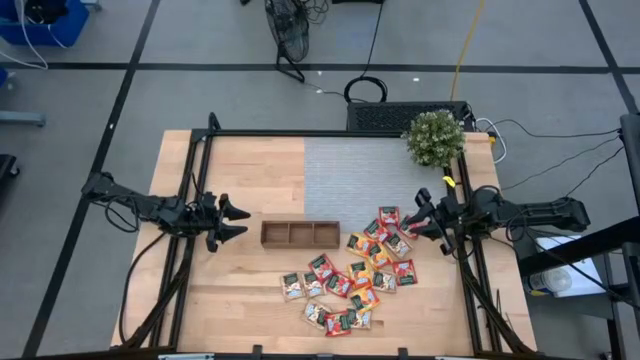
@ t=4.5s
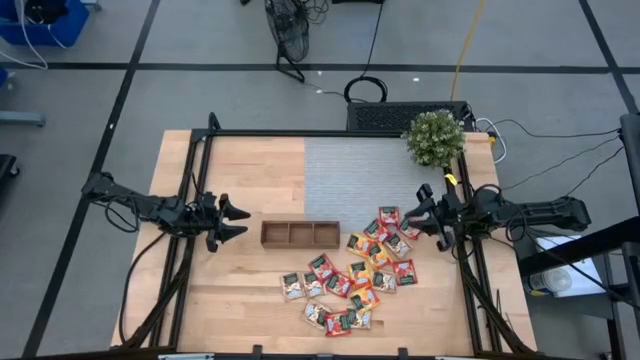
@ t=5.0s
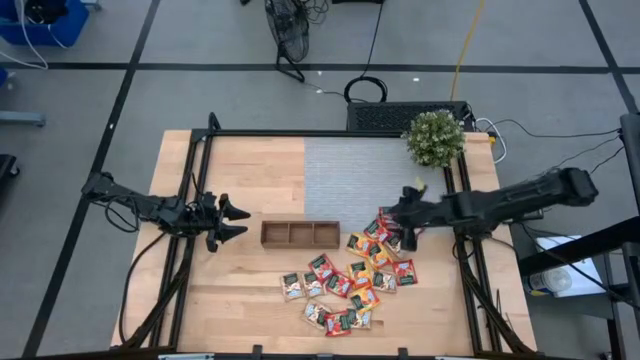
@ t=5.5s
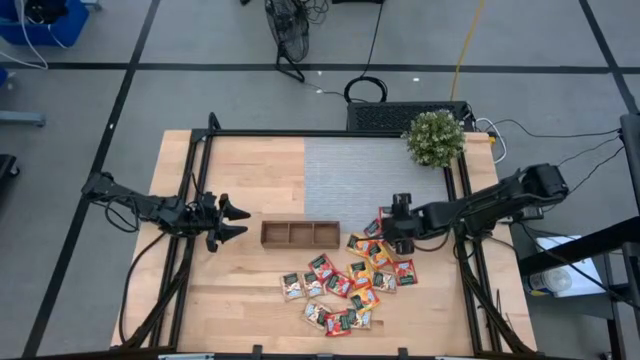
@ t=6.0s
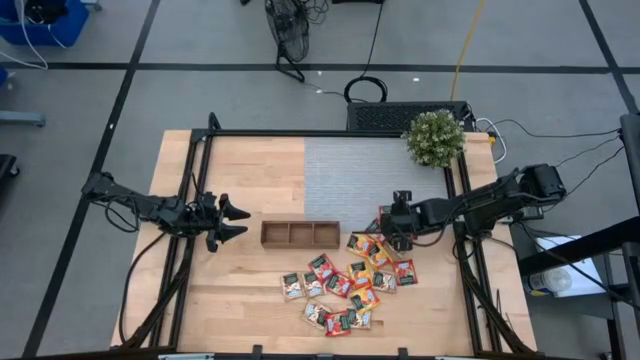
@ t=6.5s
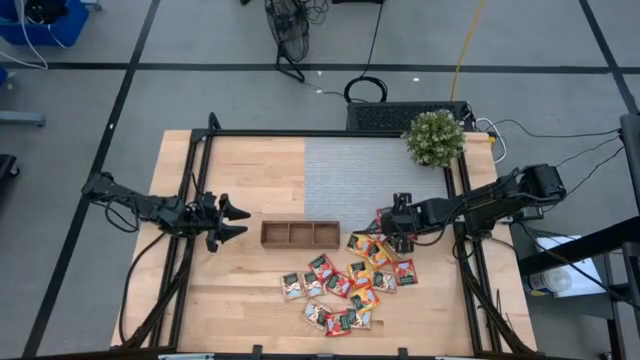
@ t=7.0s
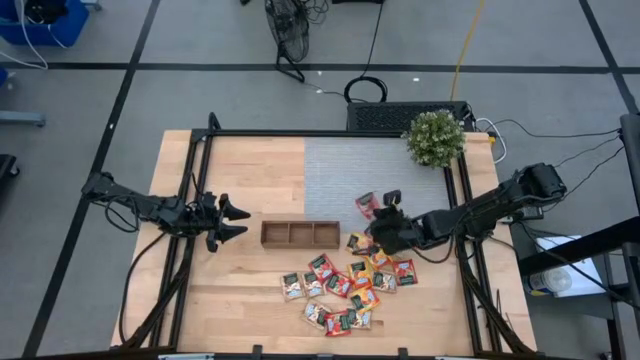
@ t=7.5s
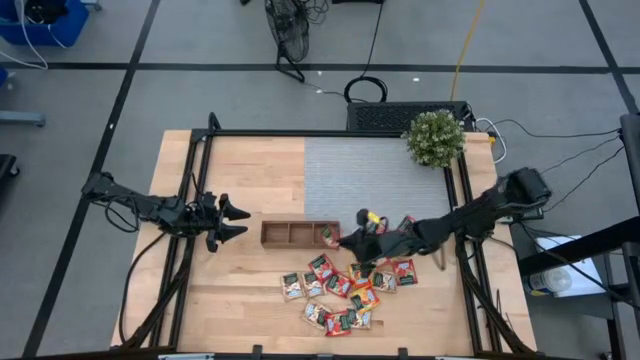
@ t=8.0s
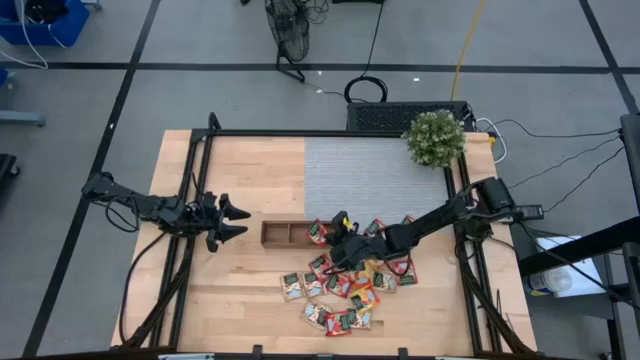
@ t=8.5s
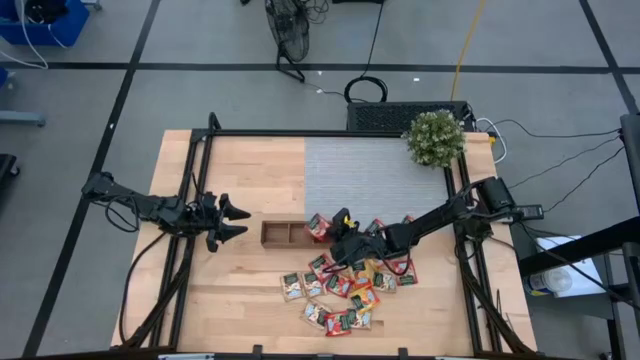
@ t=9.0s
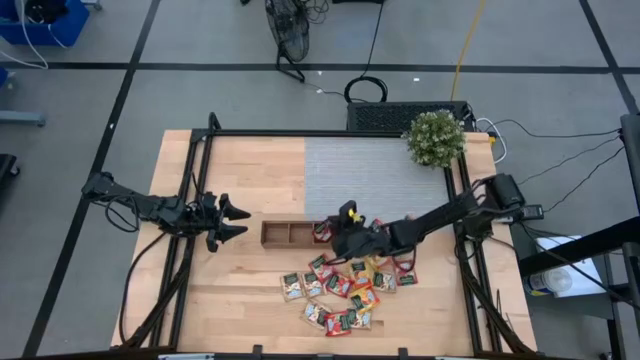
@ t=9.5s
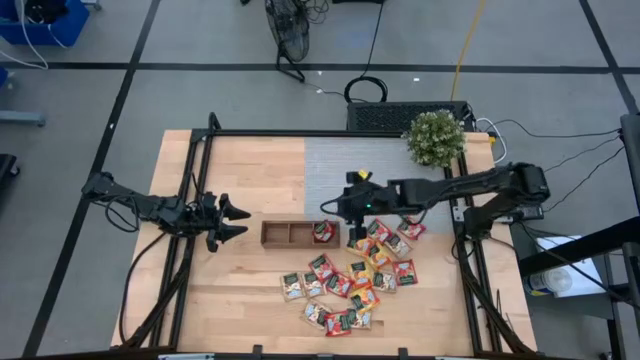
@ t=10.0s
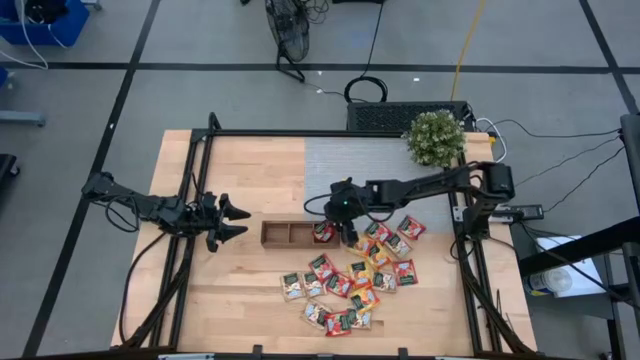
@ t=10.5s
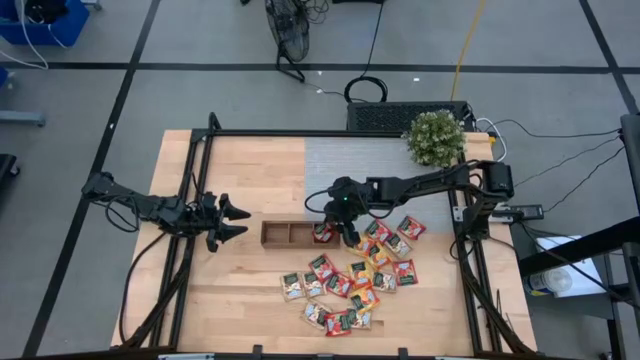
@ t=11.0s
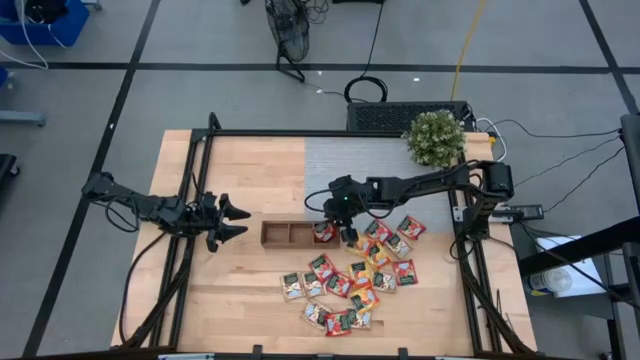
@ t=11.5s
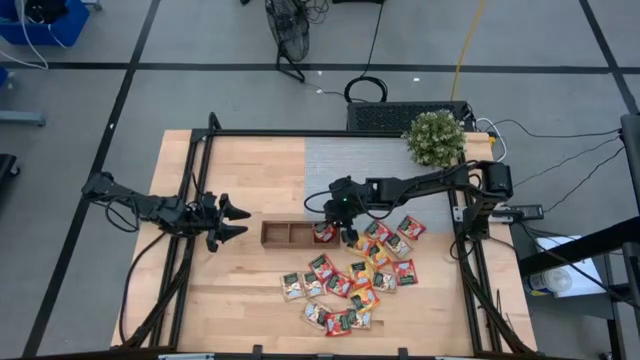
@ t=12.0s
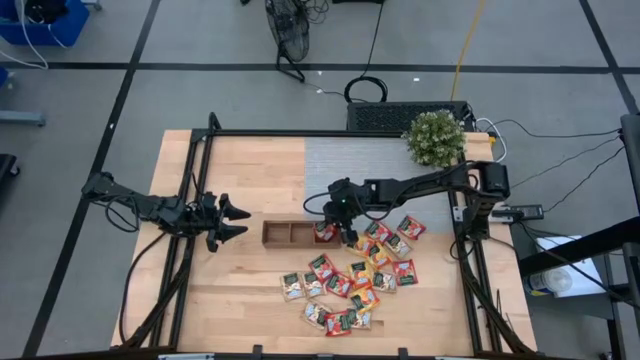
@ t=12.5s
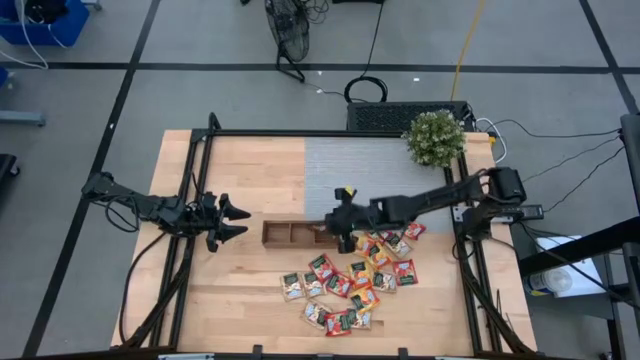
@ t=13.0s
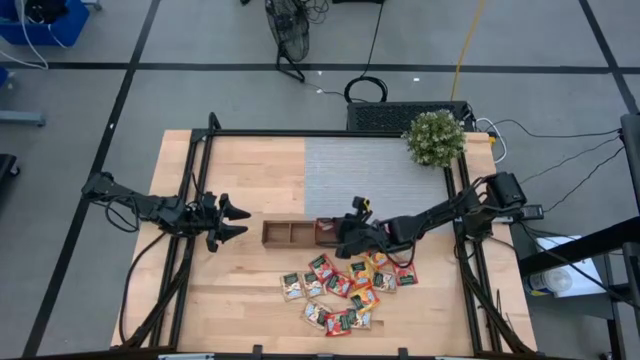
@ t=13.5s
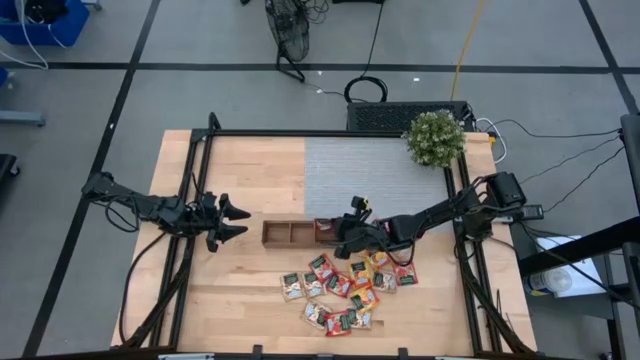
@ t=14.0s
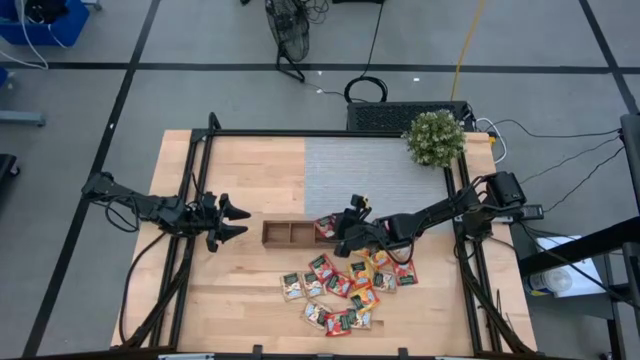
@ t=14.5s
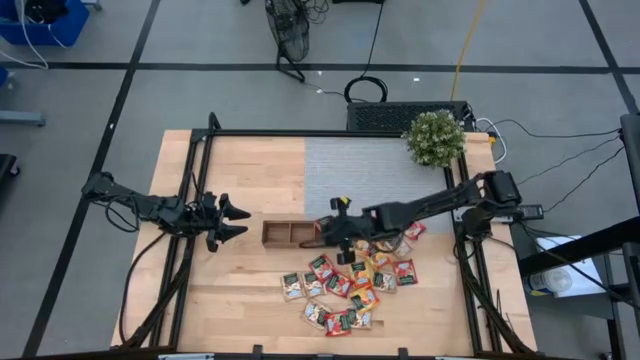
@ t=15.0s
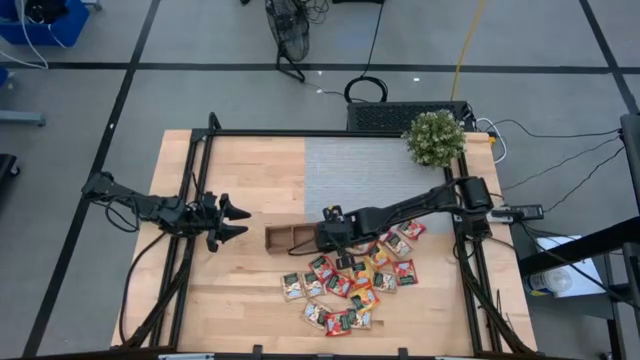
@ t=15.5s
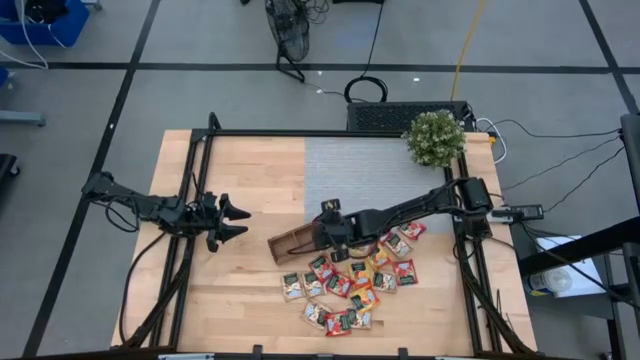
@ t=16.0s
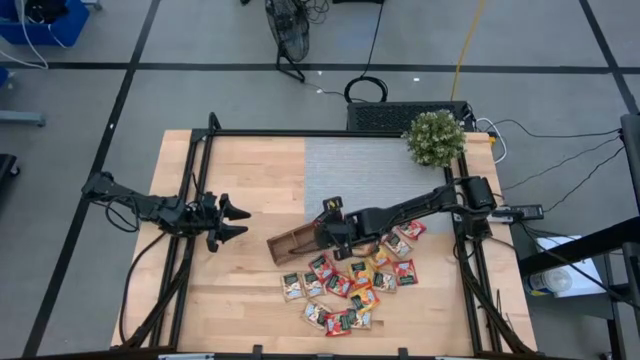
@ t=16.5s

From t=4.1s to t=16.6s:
Task: Pick & Place Tea
Put the red tea bag into the right section of the wooden organizer

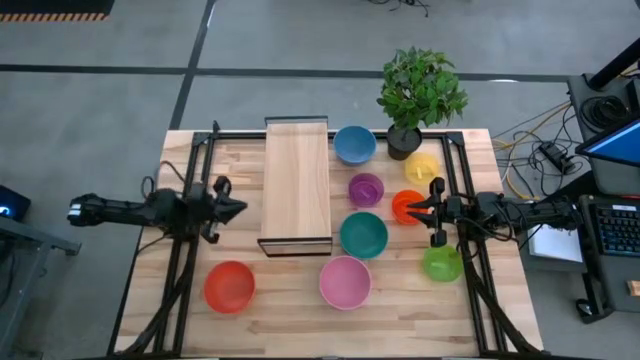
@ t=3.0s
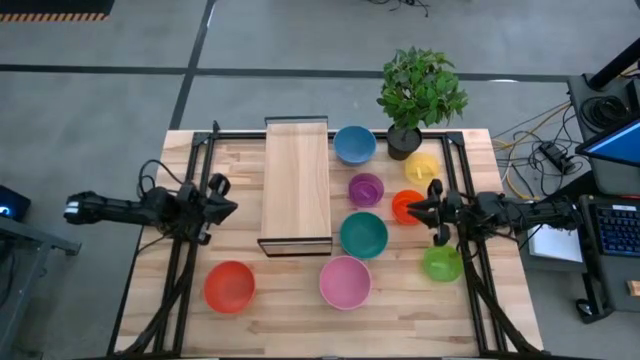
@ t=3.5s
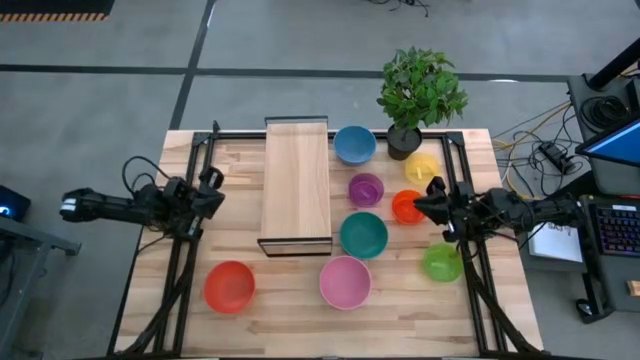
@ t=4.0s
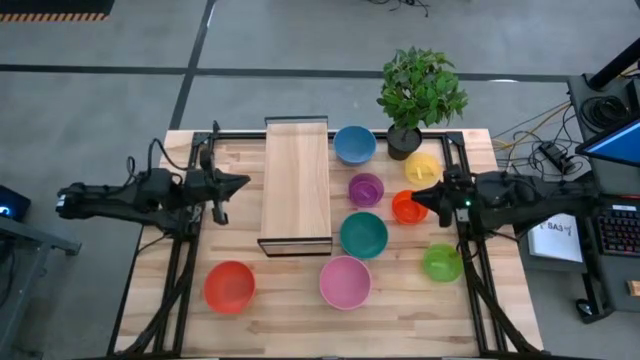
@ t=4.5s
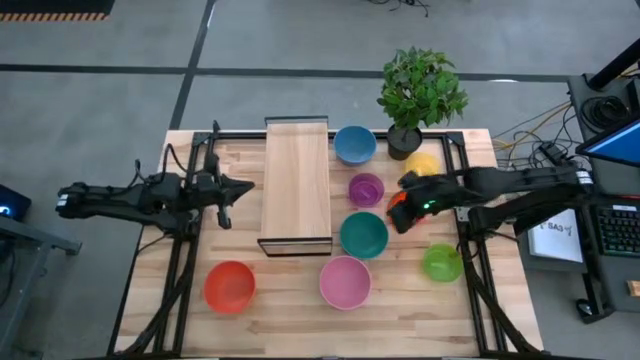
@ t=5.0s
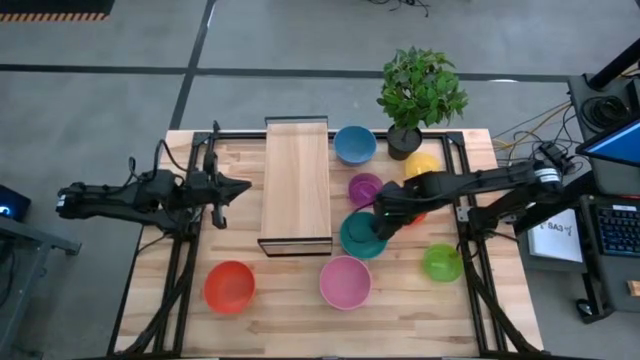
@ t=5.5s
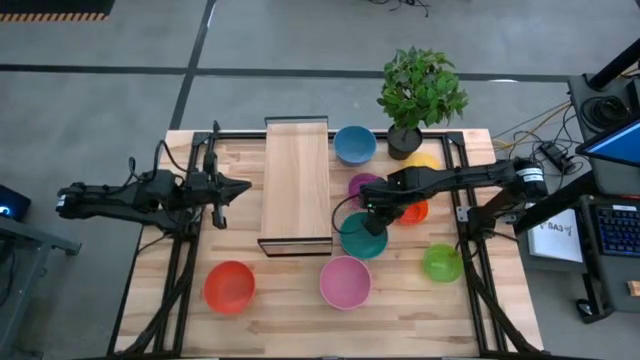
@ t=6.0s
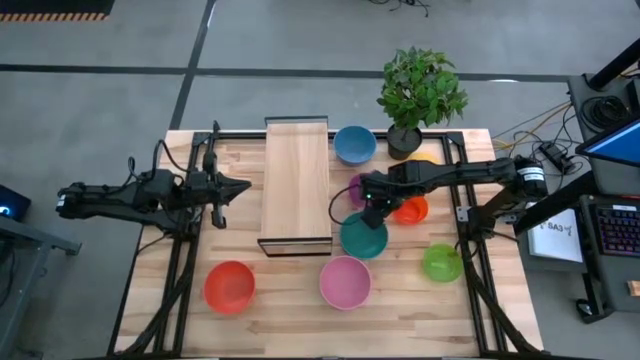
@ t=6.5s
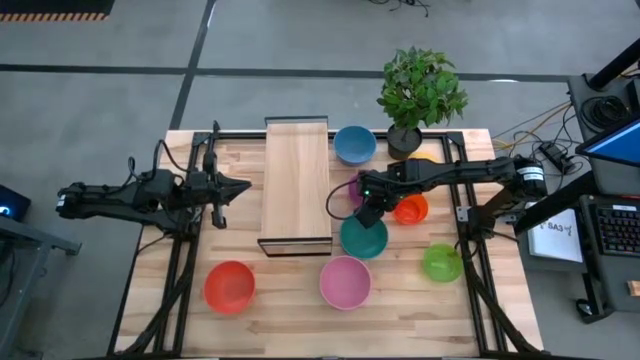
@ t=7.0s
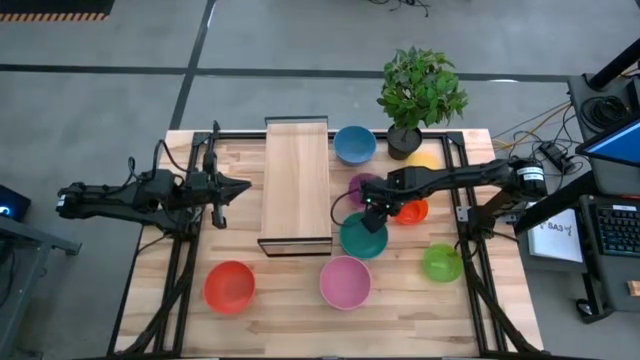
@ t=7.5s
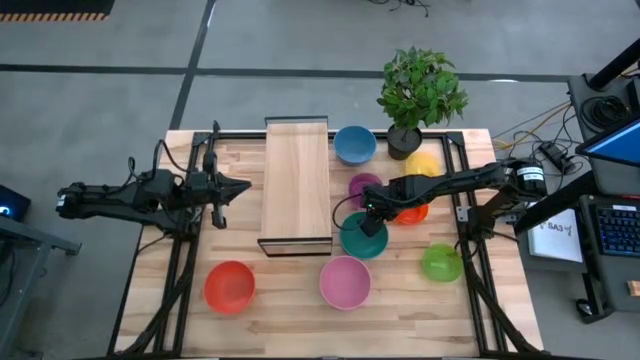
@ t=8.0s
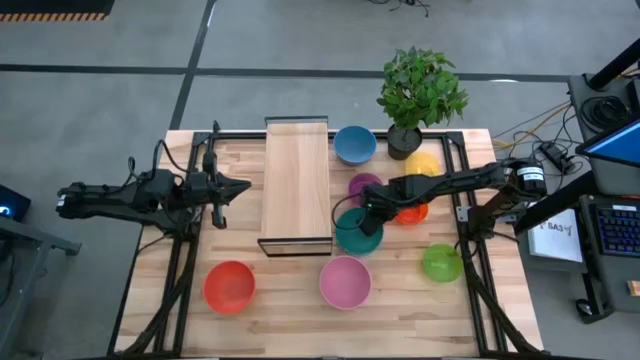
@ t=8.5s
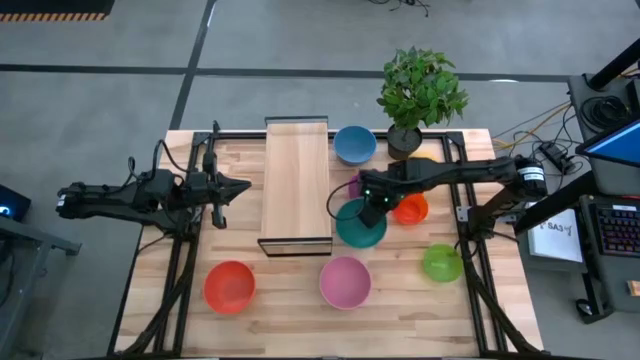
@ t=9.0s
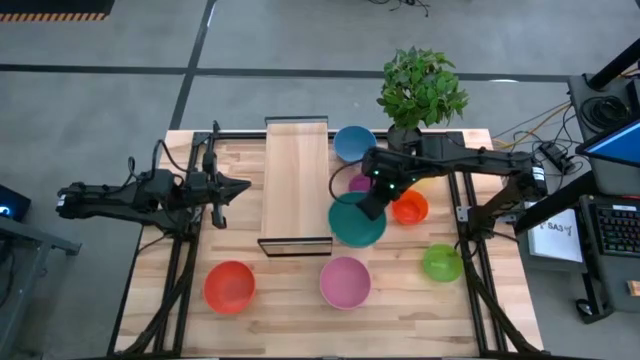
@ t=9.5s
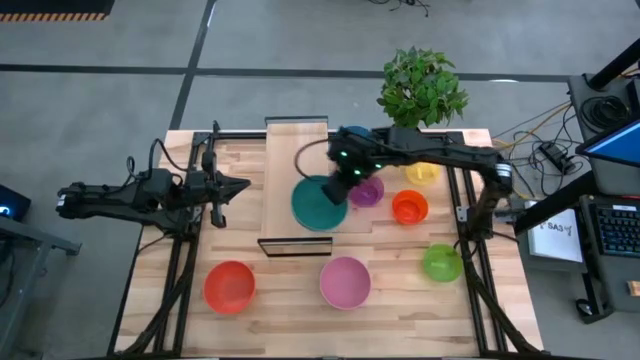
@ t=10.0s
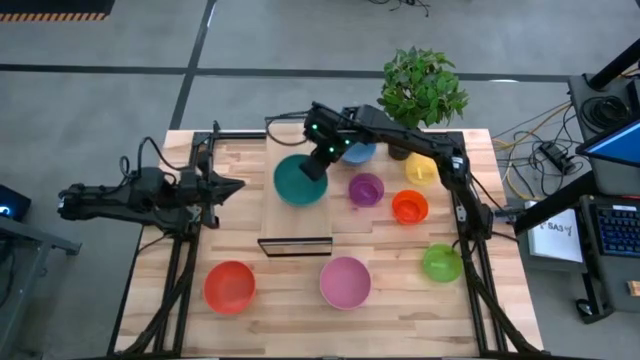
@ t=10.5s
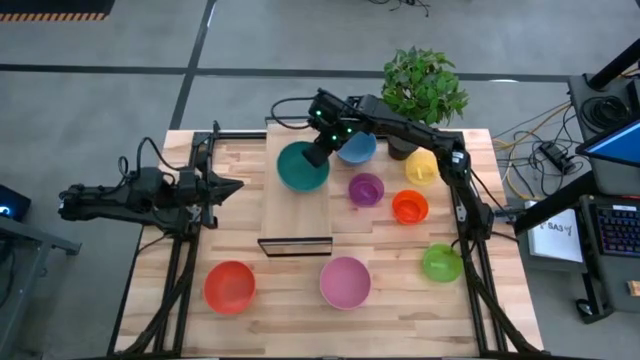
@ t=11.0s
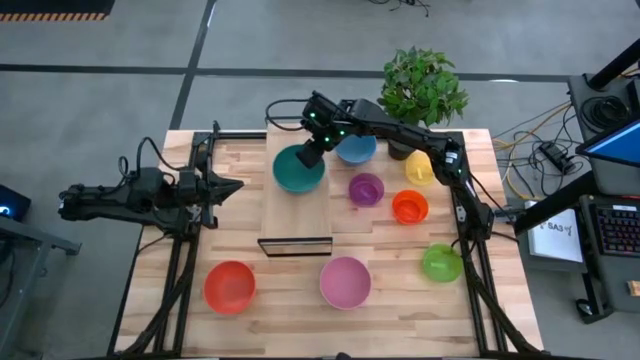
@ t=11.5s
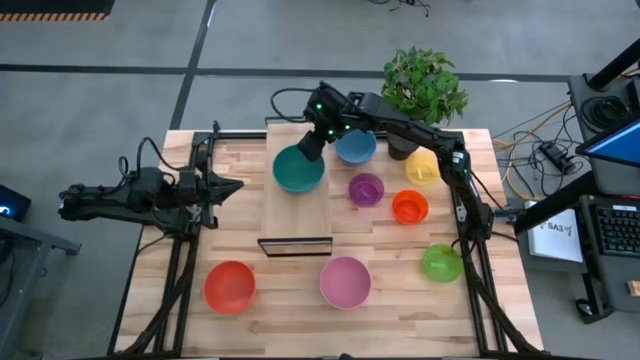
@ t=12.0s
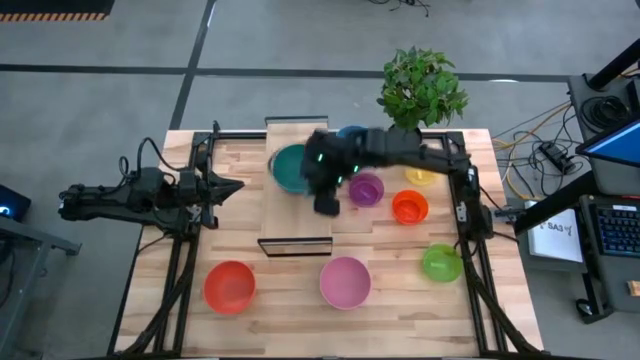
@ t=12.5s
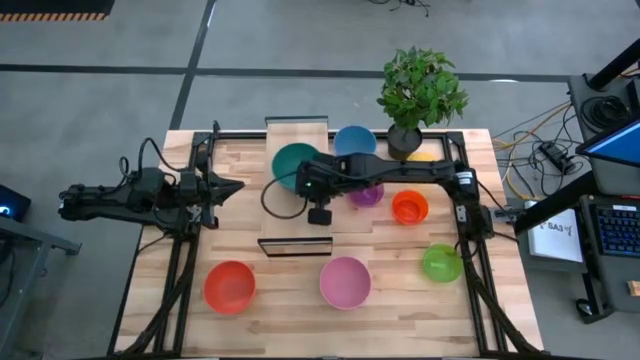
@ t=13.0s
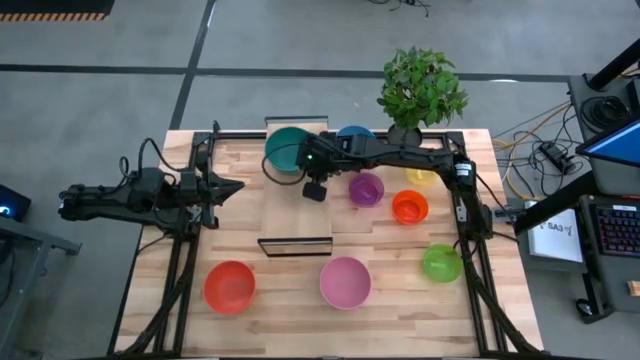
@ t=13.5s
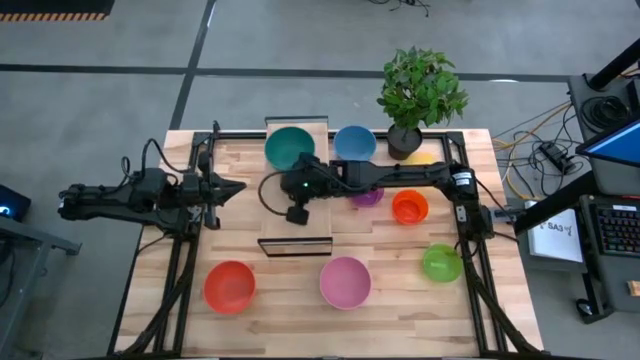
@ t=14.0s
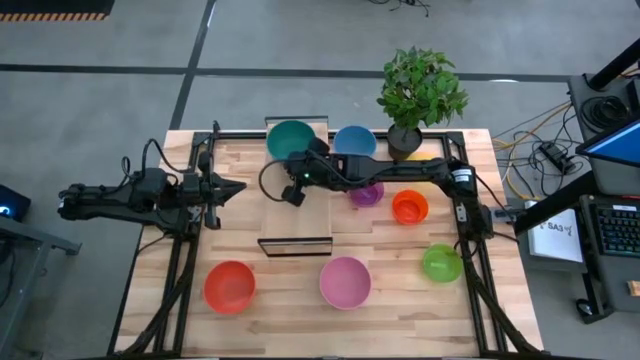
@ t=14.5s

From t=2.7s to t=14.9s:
Task: Place and stack bowls onto a shelf
Put the dark green bowl on the shelf
